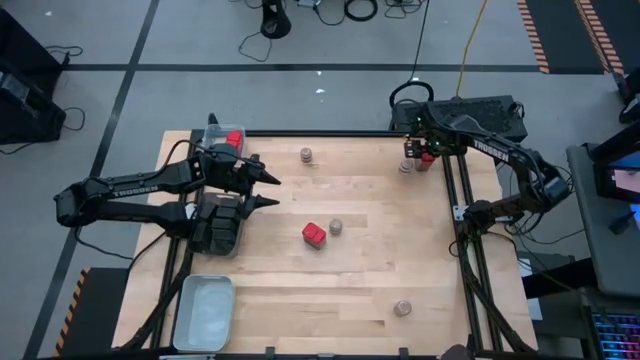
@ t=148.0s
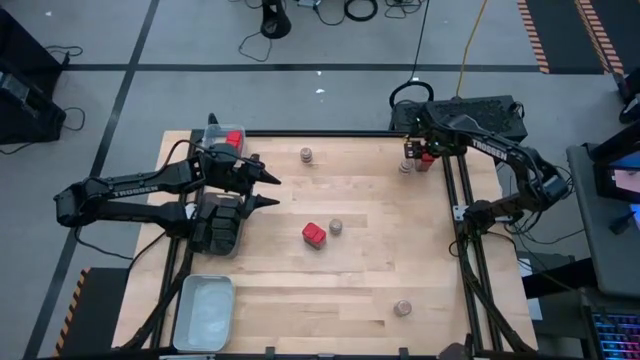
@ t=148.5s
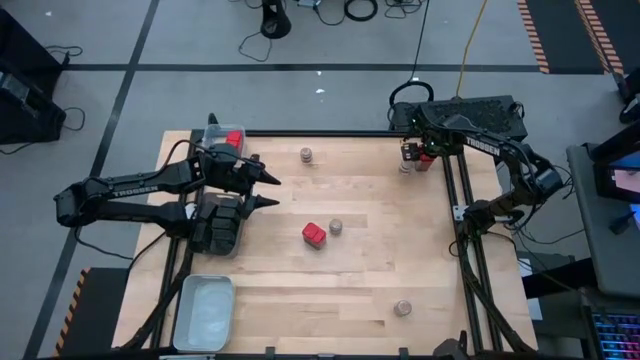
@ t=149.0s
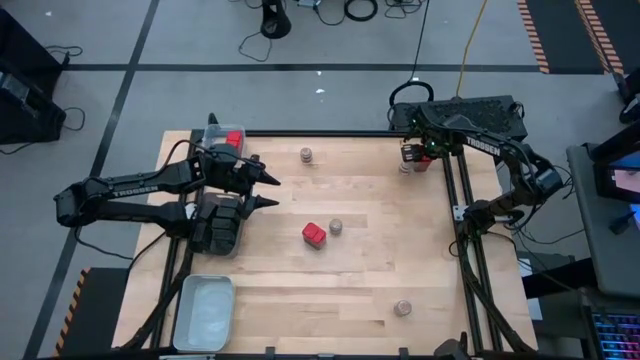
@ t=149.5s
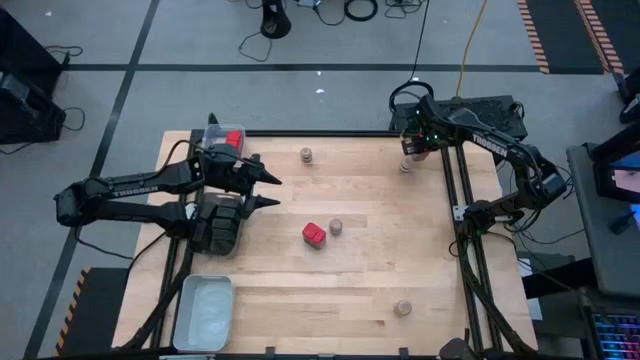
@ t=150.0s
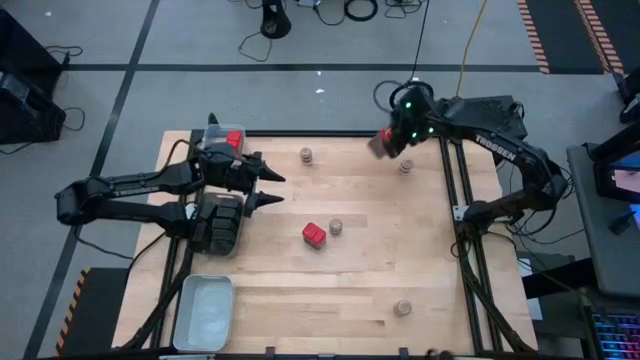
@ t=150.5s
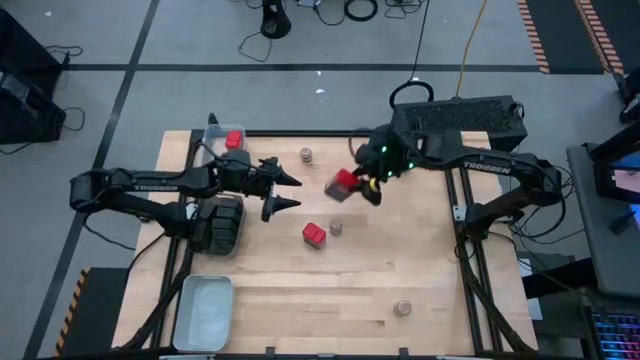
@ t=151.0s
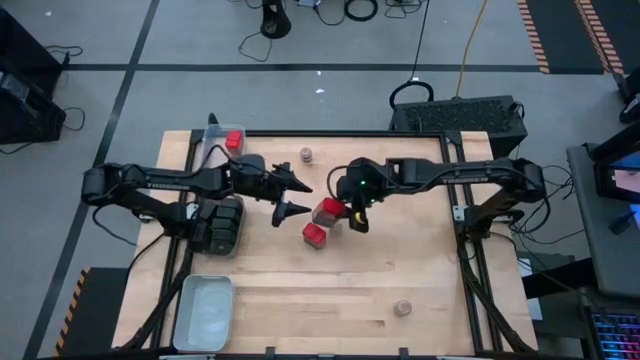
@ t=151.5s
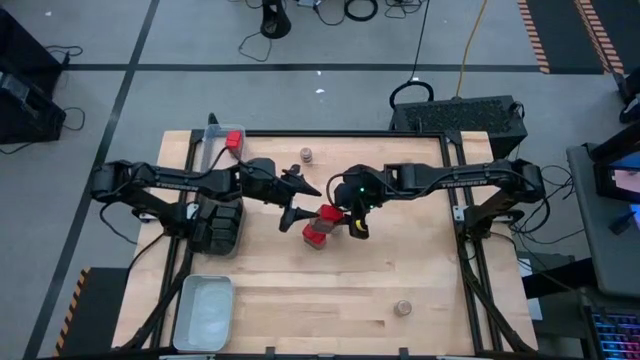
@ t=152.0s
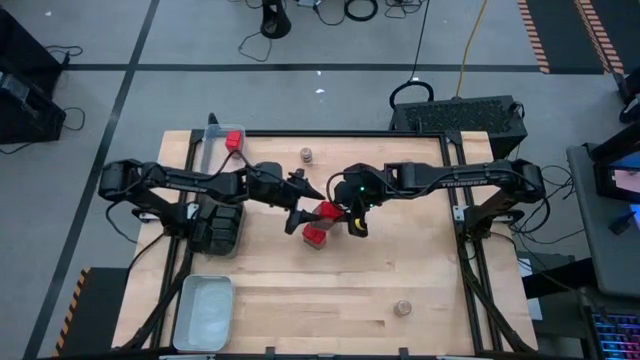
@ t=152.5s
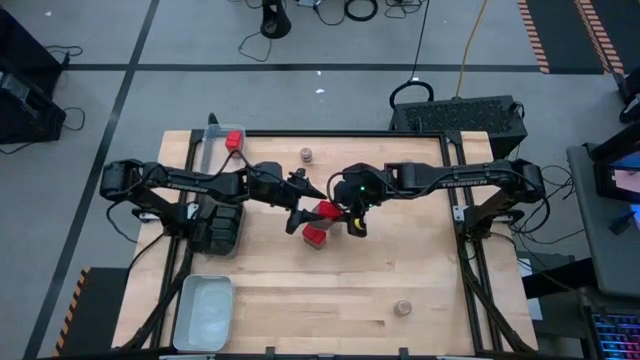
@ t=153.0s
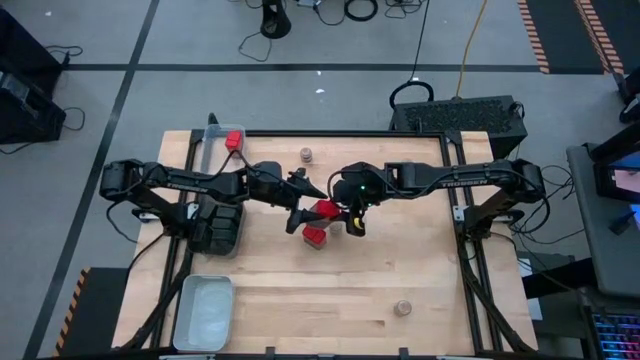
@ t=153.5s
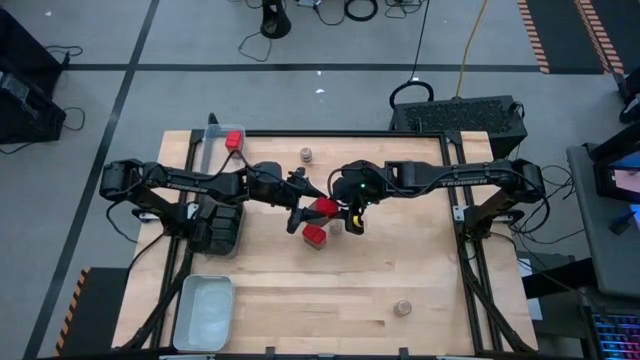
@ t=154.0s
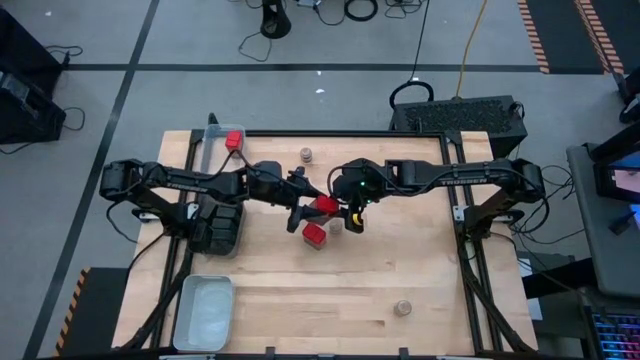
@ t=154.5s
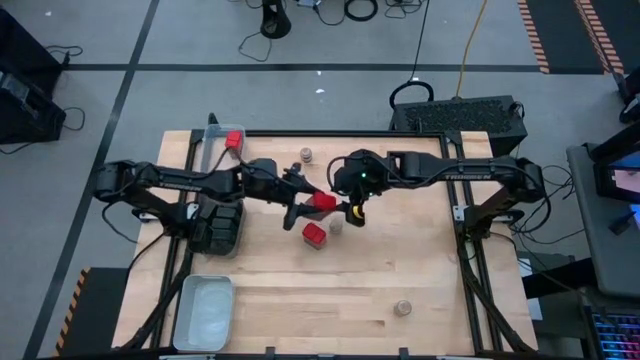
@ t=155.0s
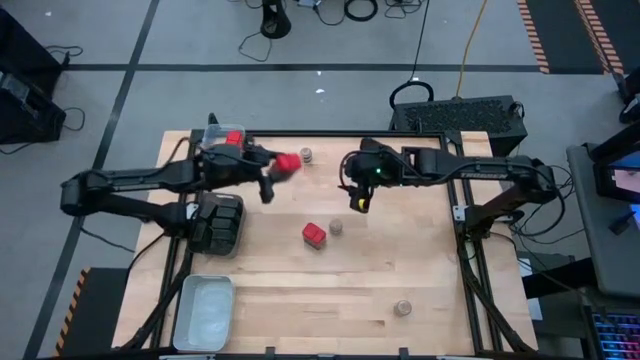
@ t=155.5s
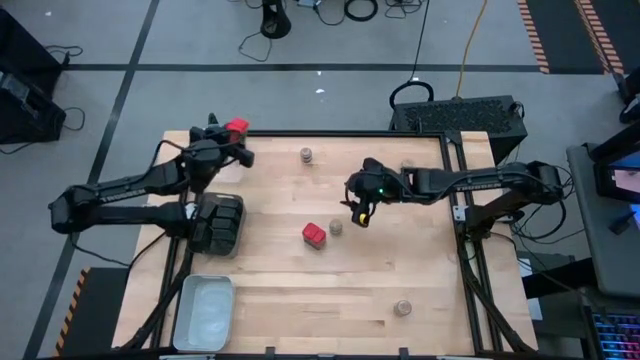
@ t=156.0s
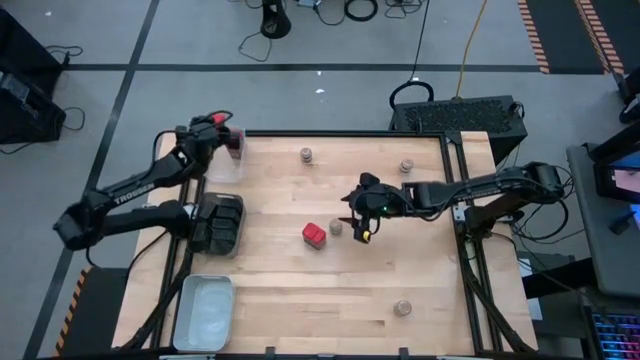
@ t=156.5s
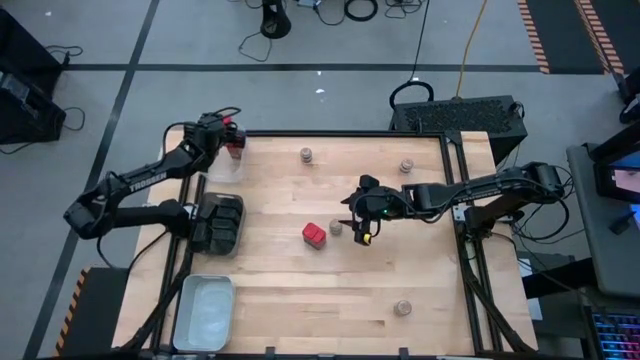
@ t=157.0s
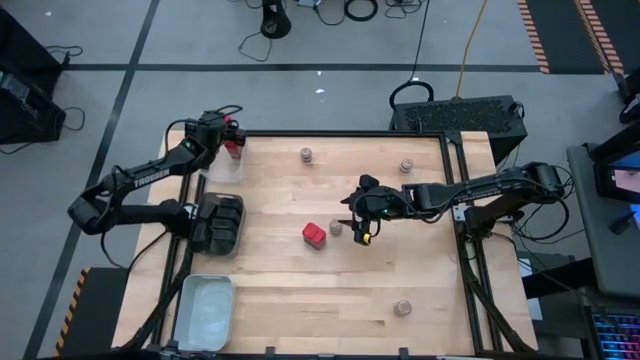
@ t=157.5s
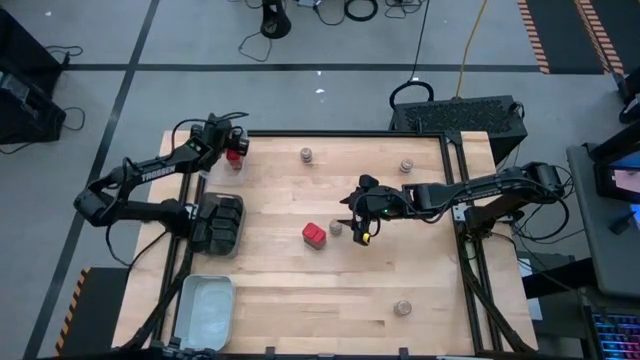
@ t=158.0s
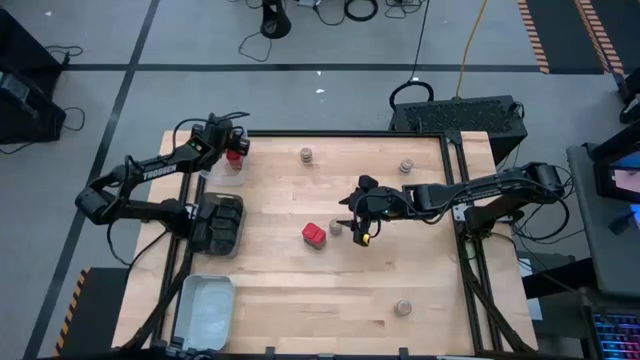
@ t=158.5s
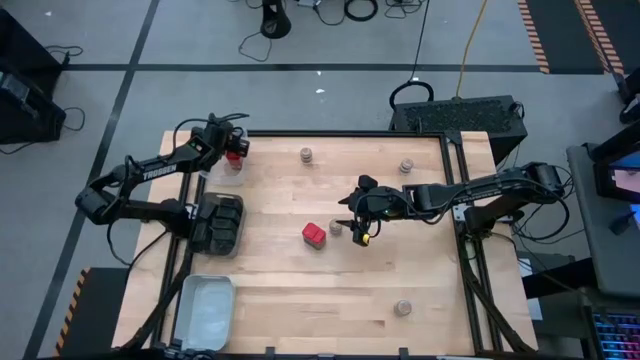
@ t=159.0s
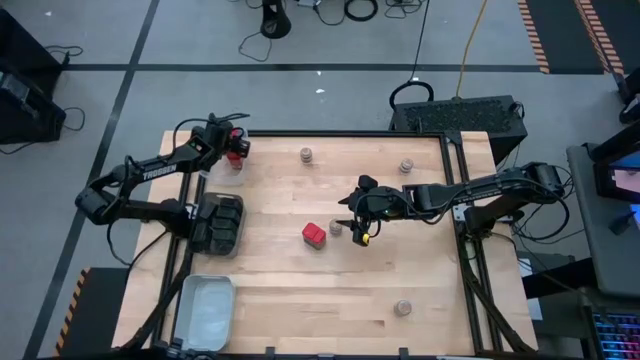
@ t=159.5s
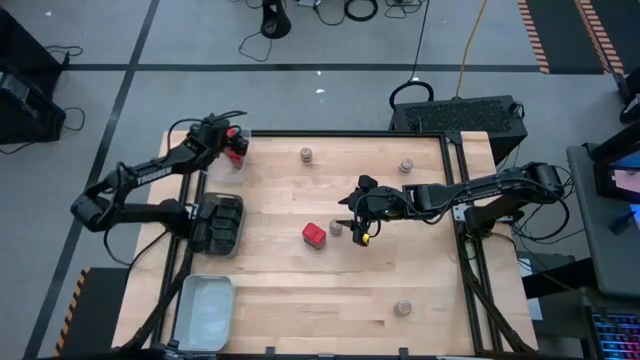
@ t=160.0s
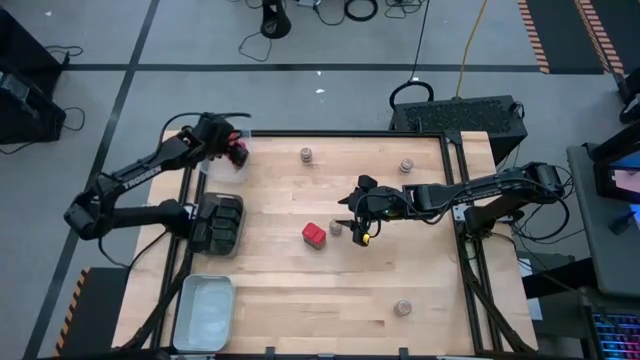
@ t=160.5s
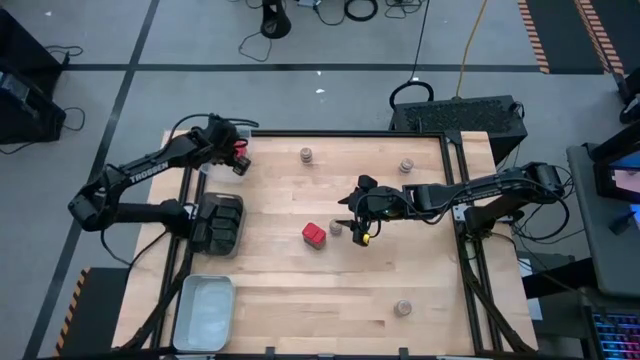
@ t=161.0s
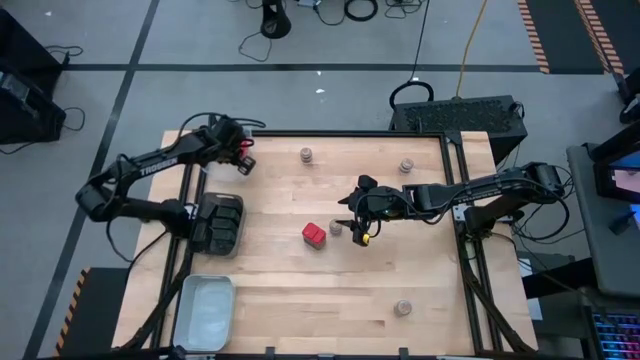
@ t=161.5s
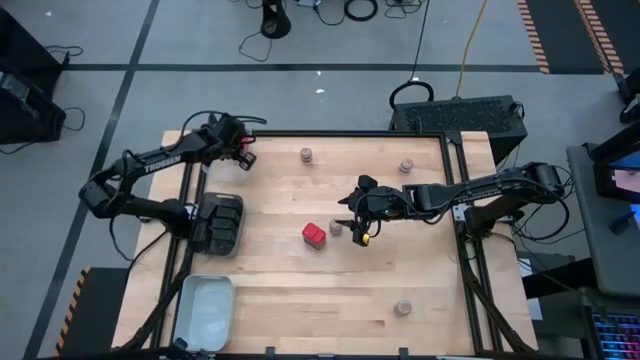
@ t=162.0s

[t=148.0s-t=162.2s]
Task: Sort spices by type
Put the red seasoning can into the transparent bin

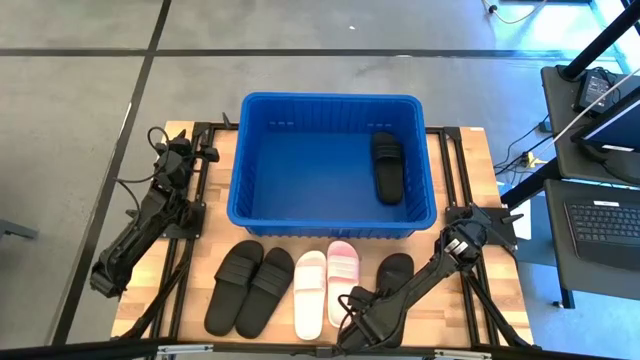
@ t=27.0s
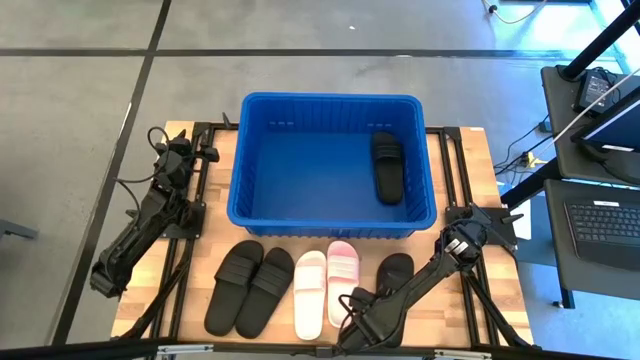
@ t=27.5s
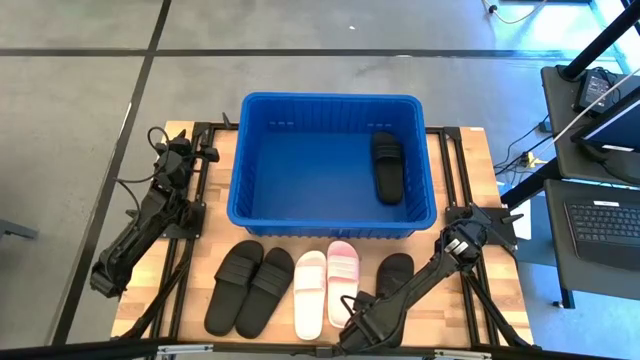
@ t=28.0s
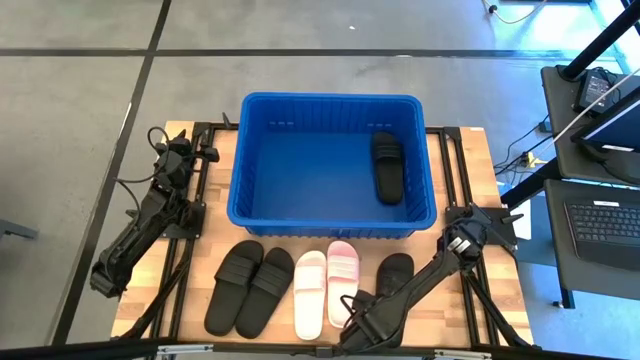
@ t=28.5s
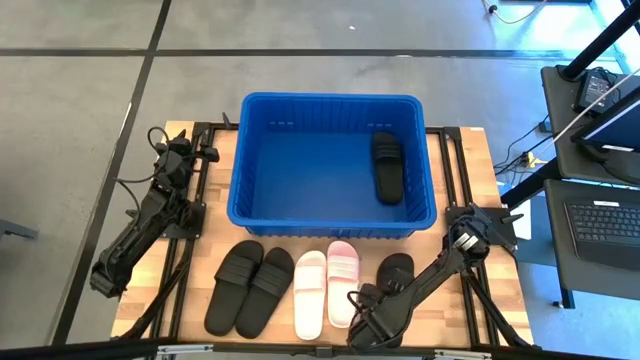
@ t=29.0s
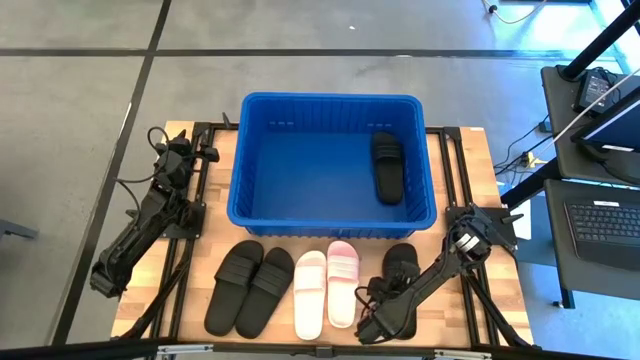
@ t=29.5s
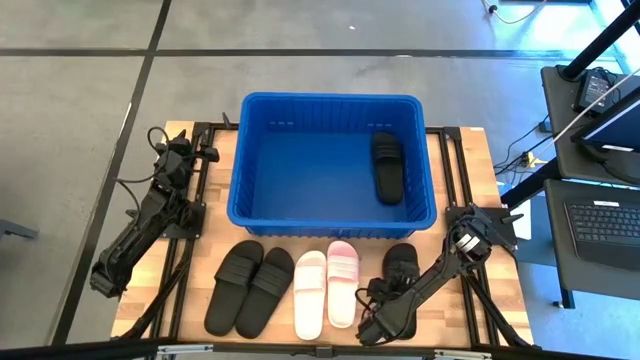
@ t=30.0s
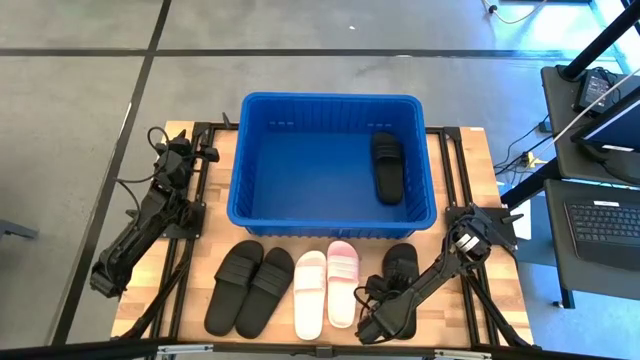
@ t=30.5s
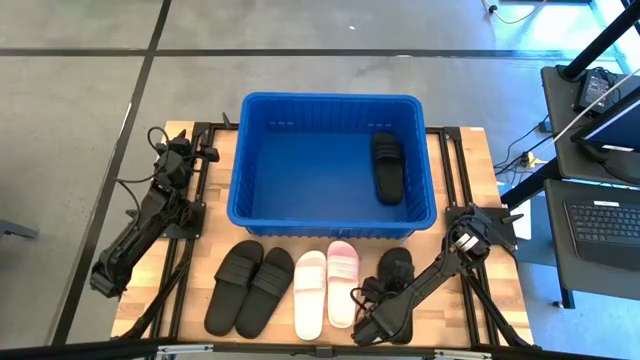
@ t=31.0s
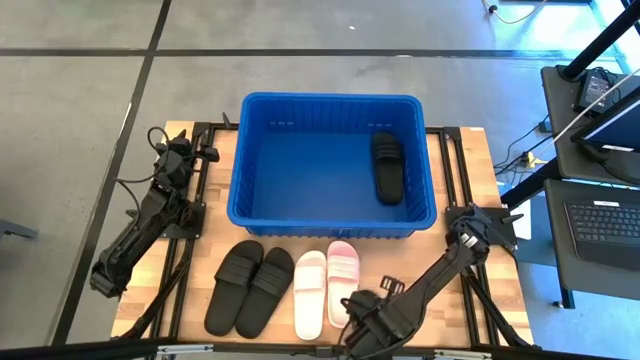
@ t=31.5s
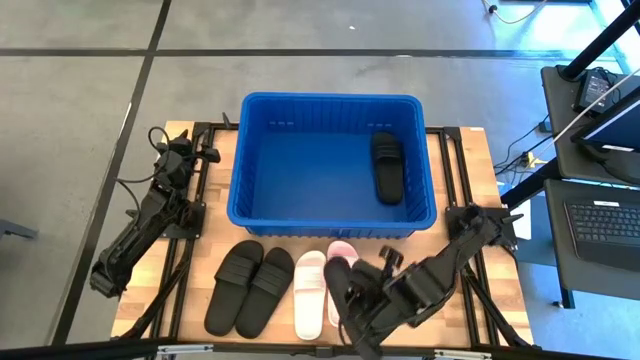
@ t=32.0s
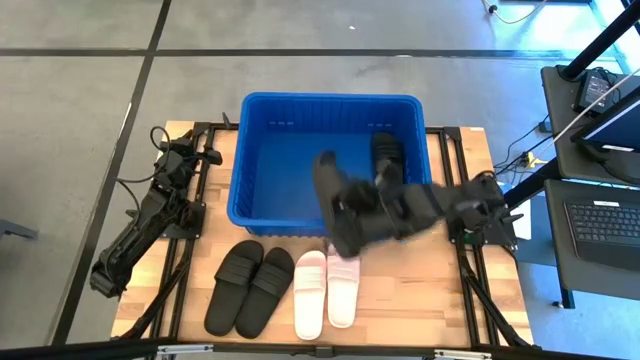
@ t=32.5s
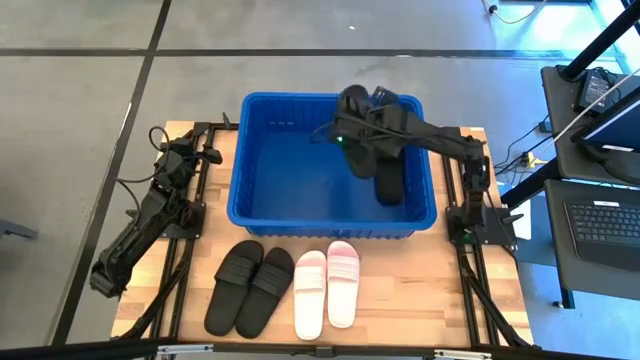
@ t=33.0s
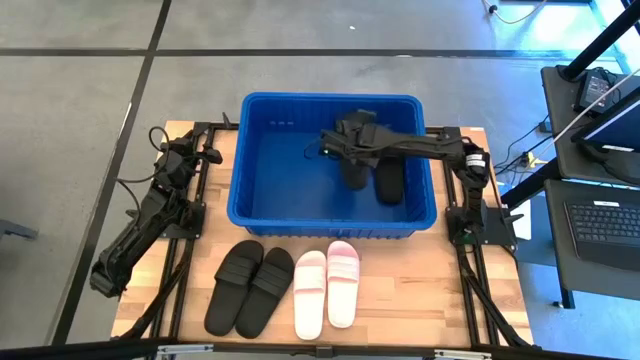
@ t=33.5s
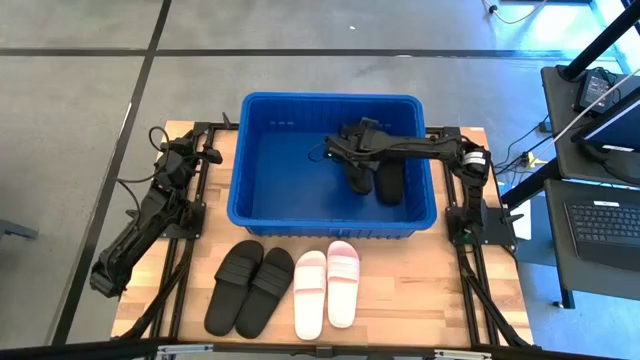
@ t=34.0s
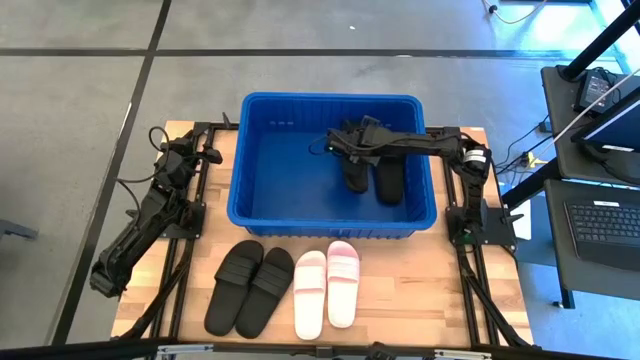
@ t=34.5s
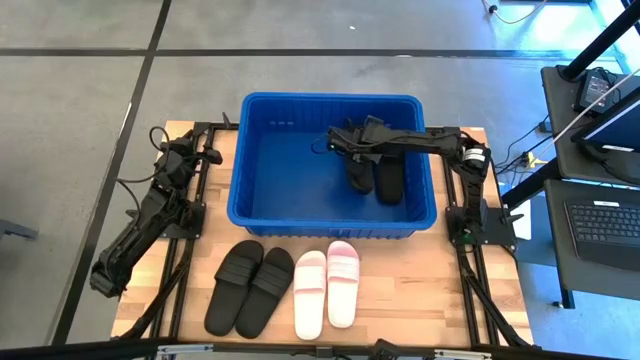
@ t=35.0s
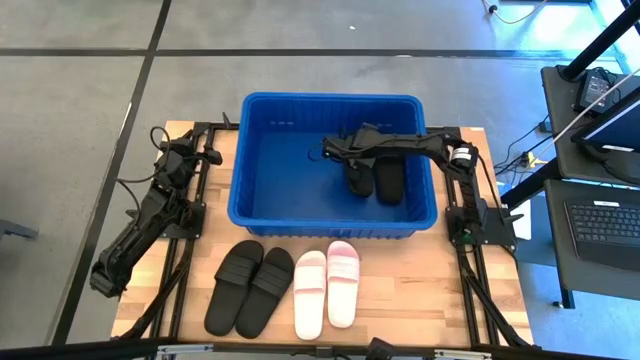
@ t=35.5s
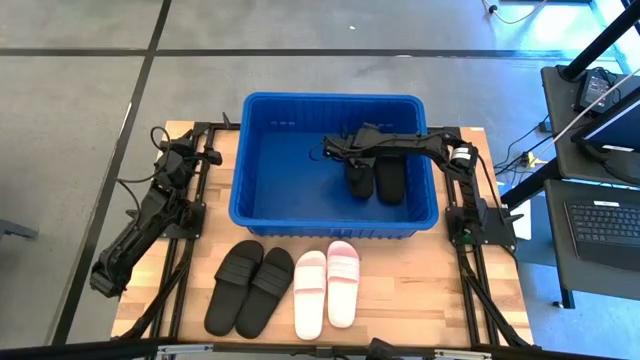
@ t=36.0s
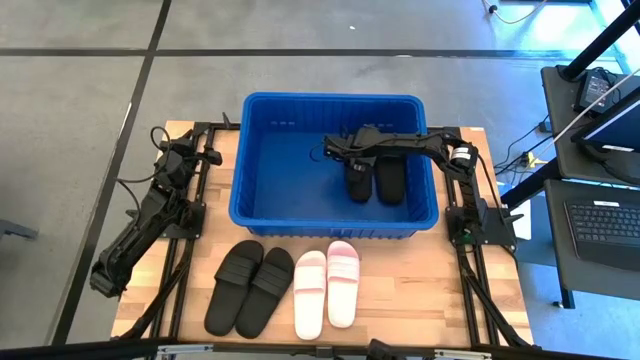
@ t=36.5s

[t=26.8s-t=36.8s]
Task: Pick and place slides into bin
Put the black slipper into the blue bin
